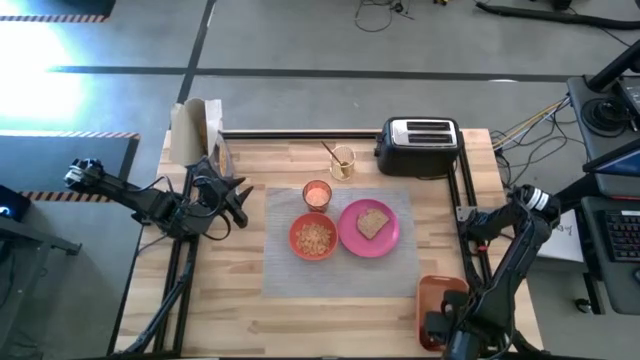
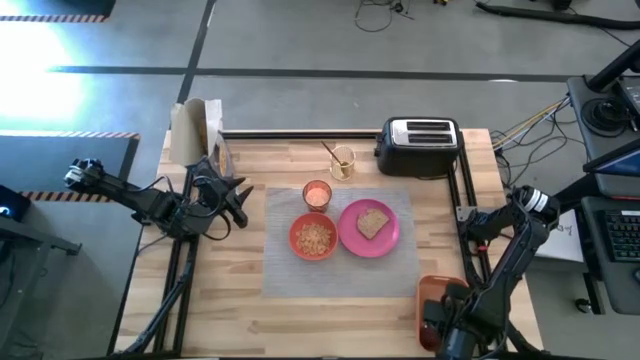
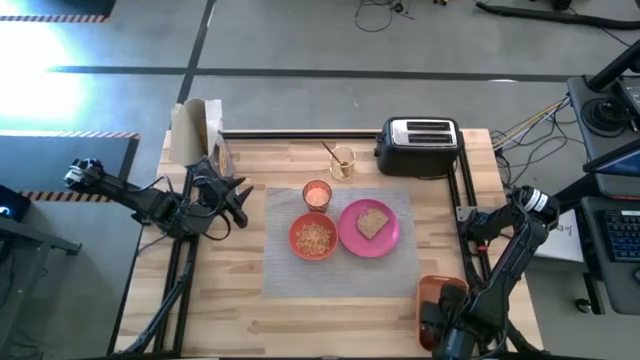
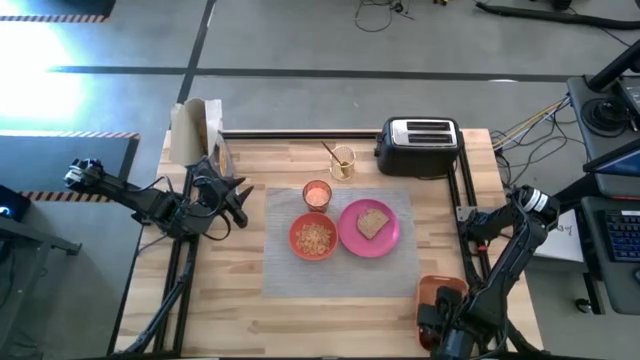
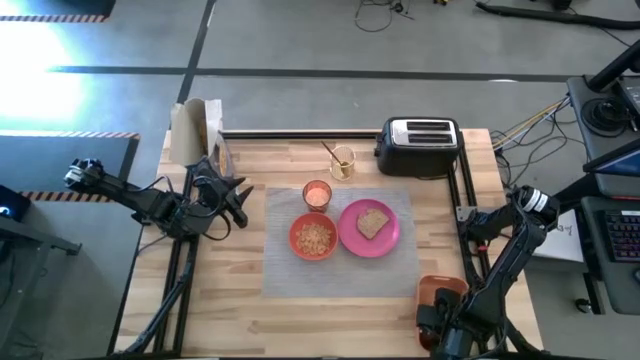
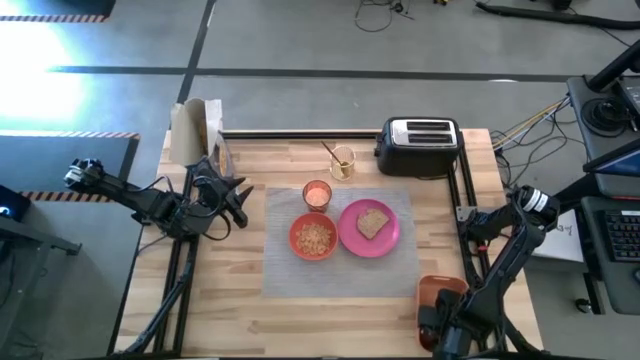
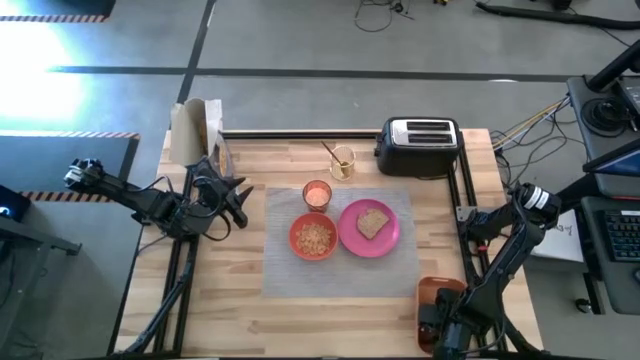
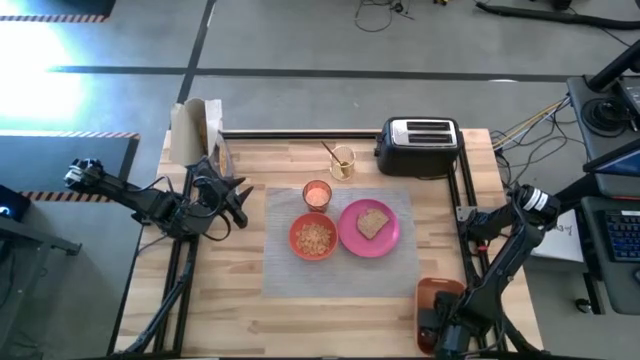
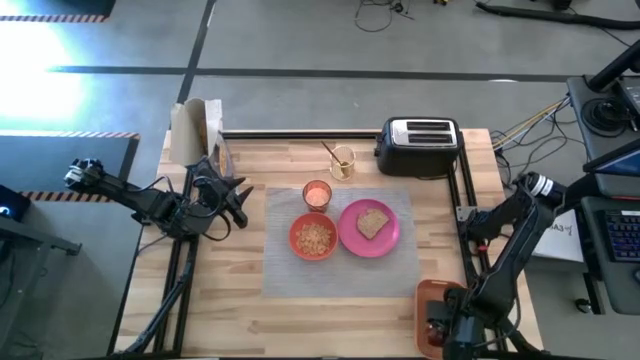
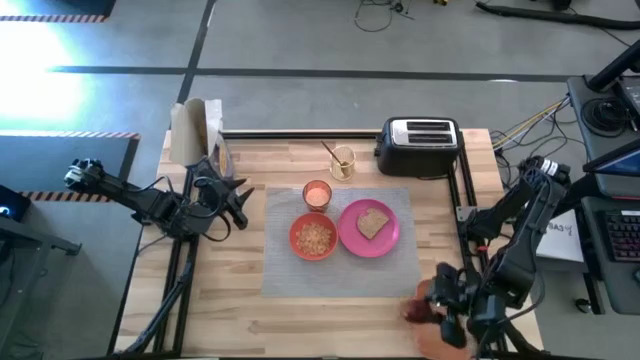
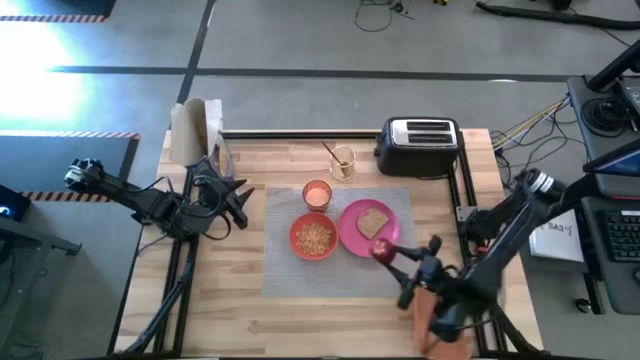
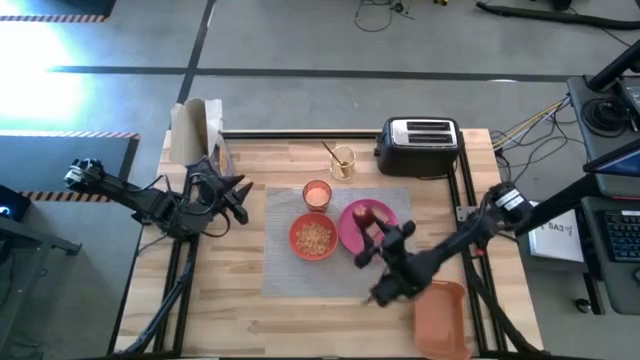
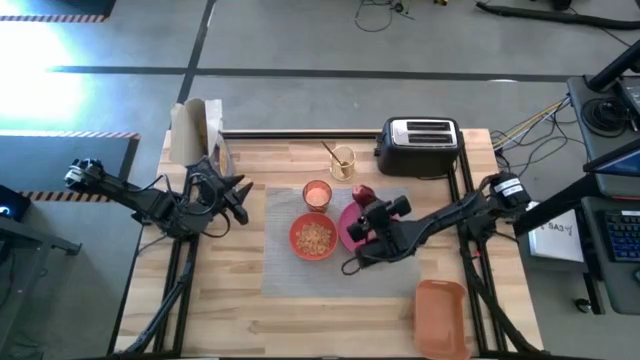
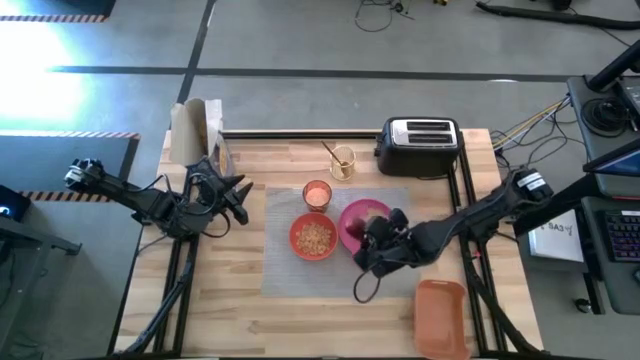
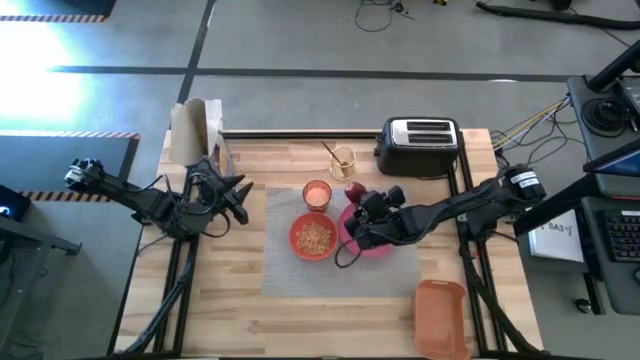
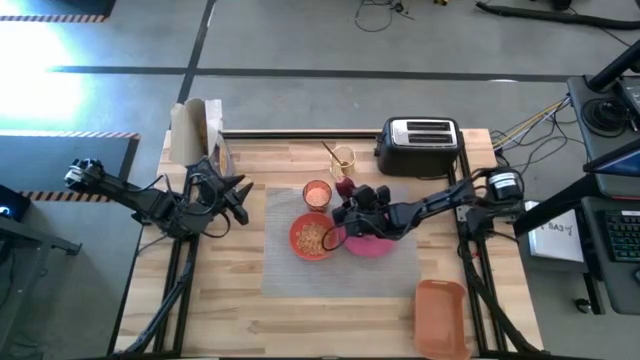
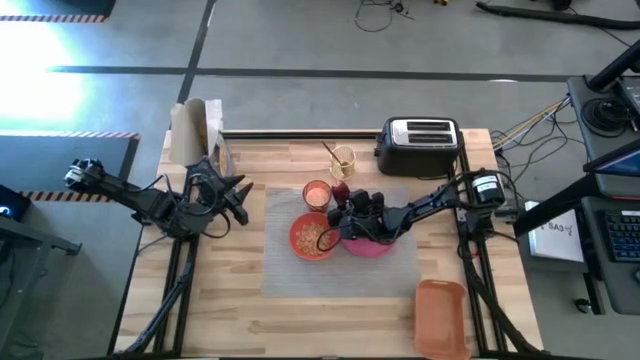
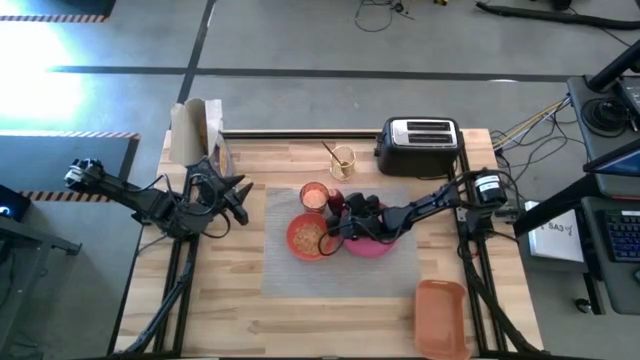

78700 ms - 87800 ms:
Task: Arrange a breakfast setting
Put the red apple on the gray tablemat to the top right of the orange bowl

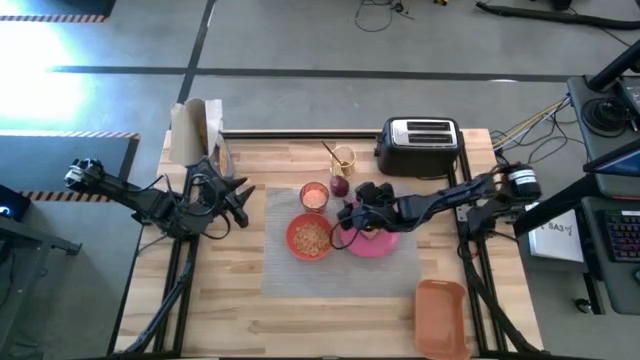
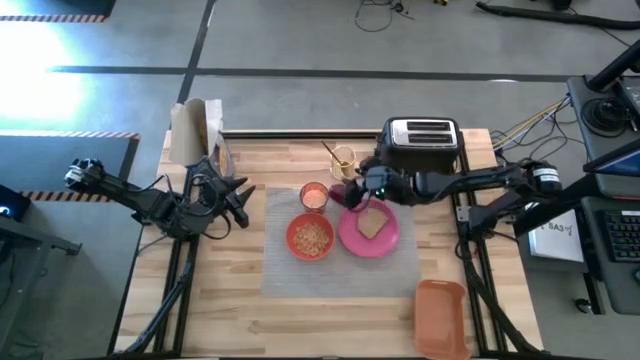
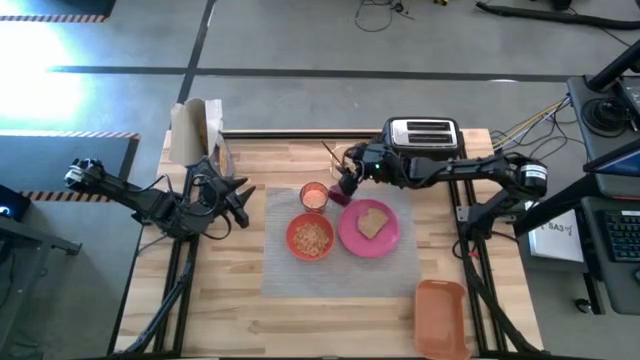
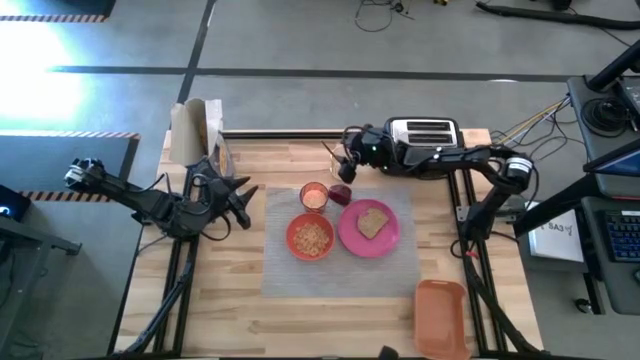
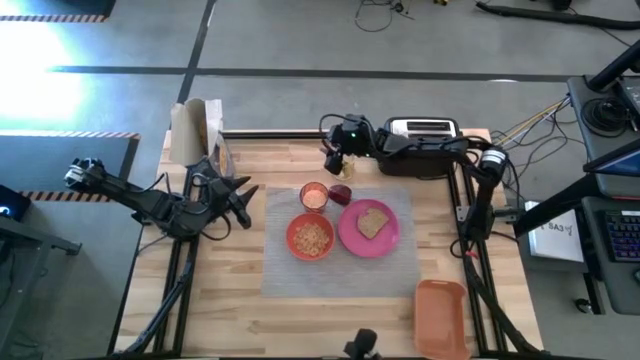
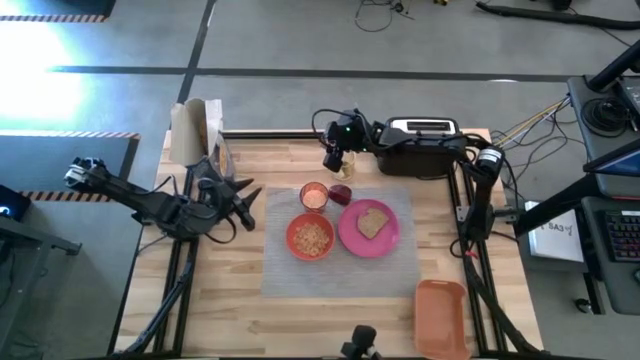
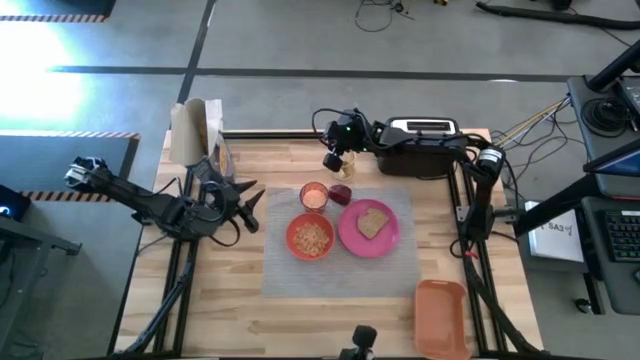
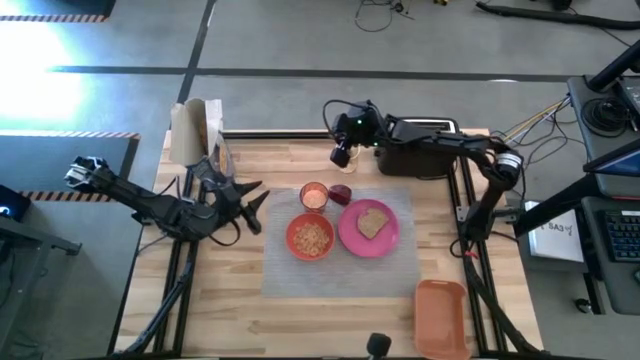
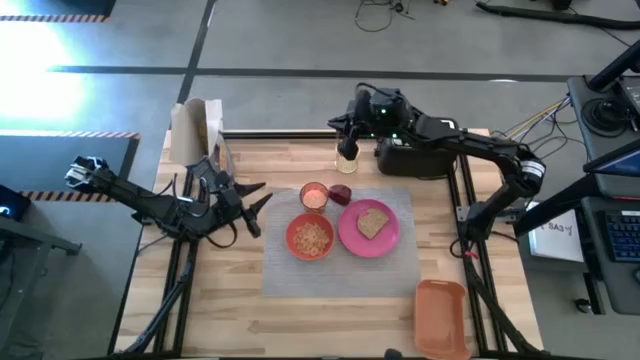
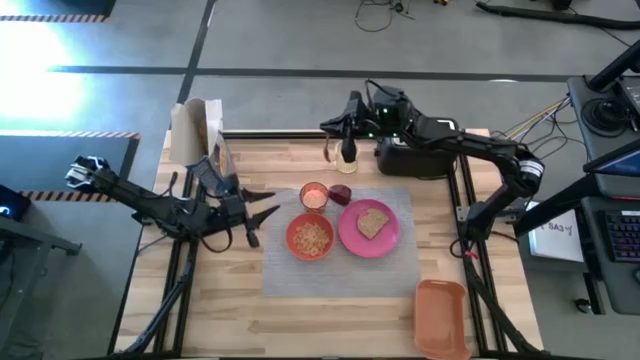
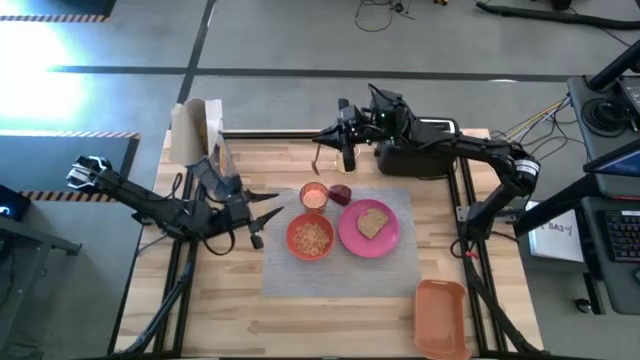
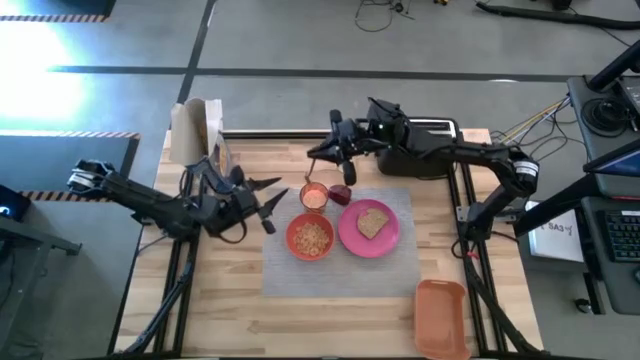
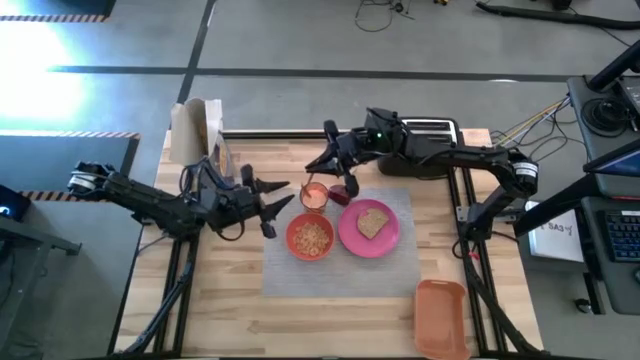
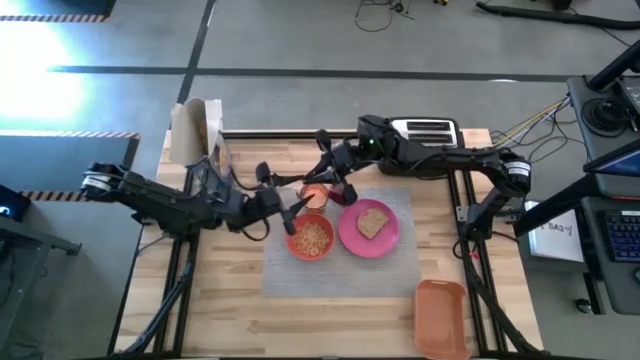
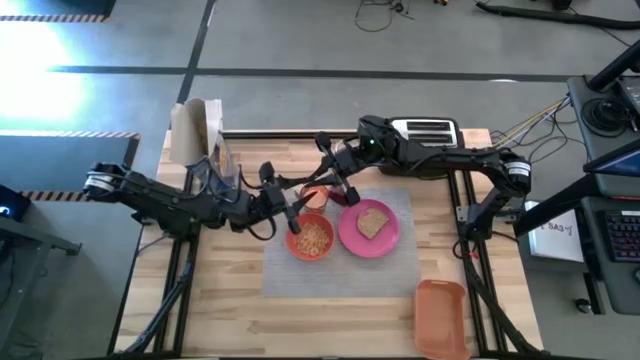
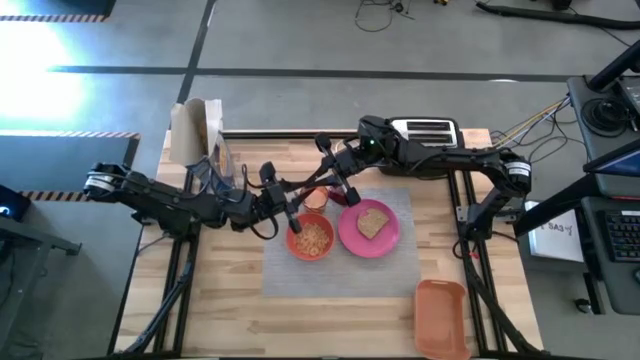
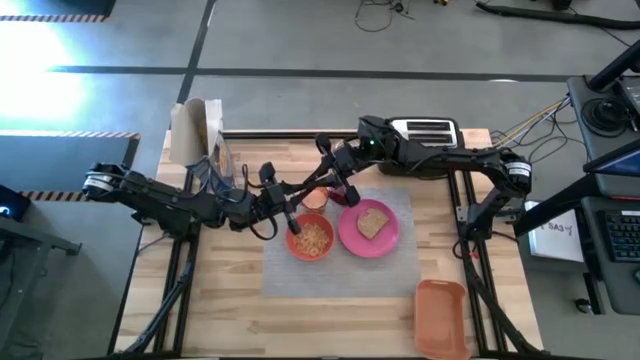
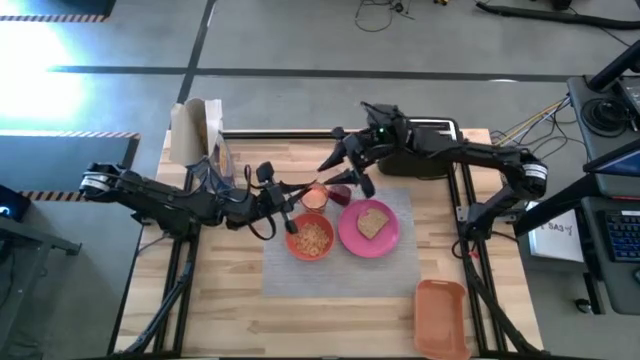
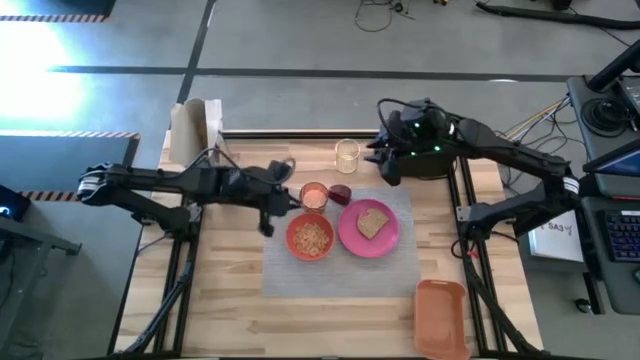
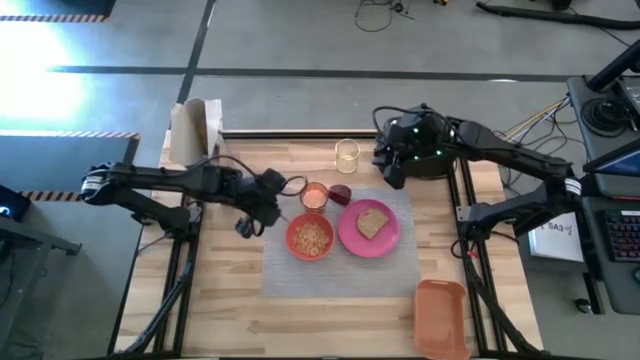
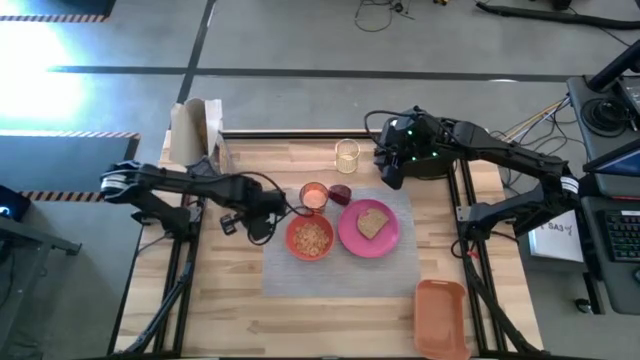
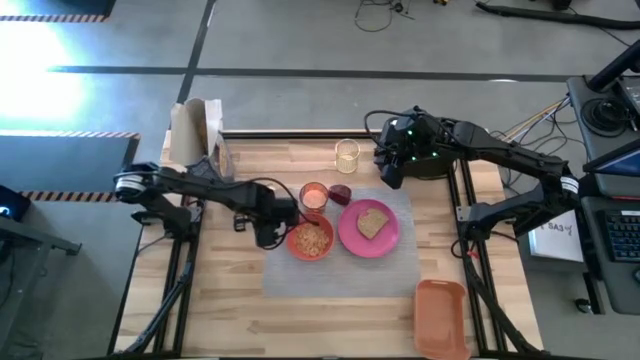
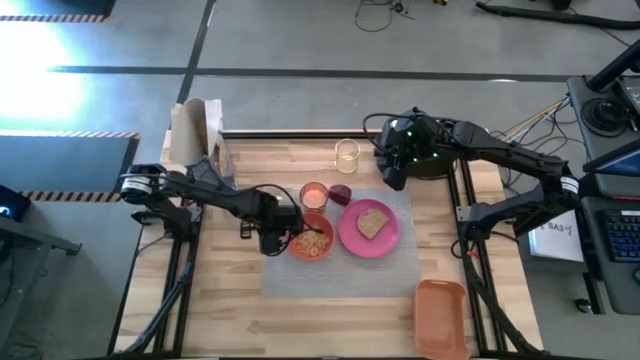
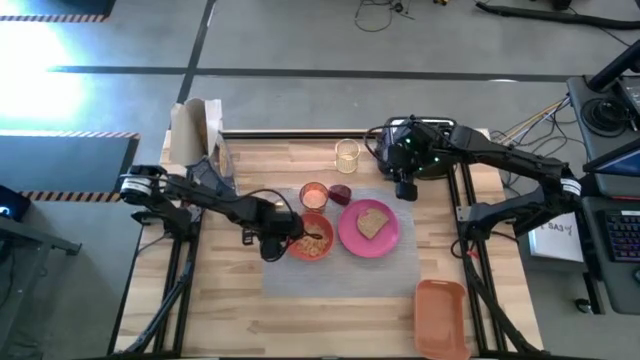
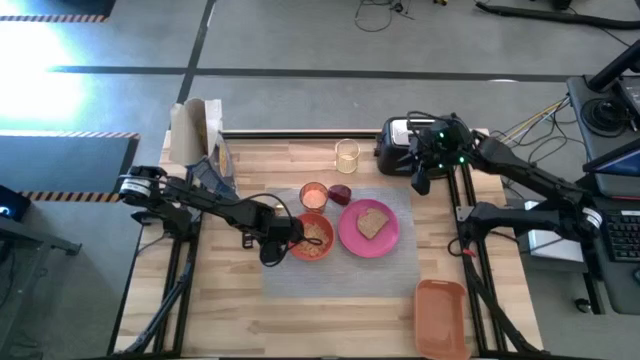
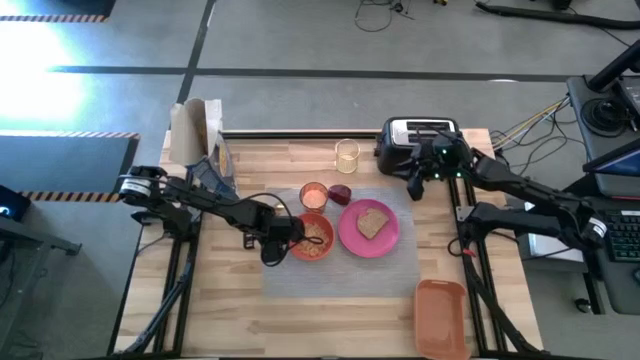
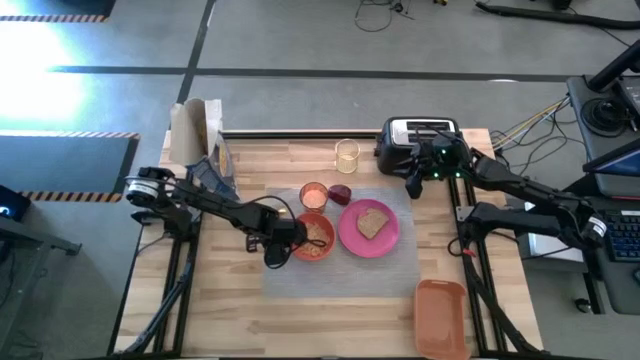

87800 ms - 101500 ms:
Put the gold spoon on the gray tablemat to the left of the orange bowl
